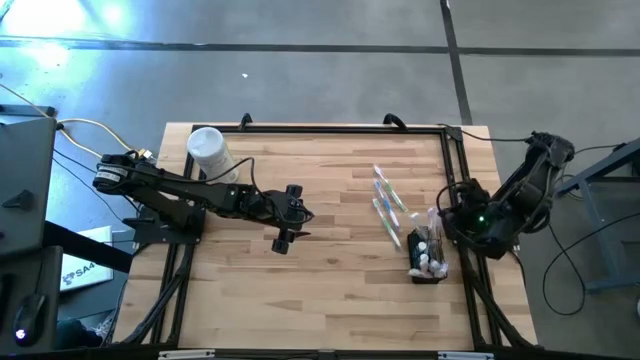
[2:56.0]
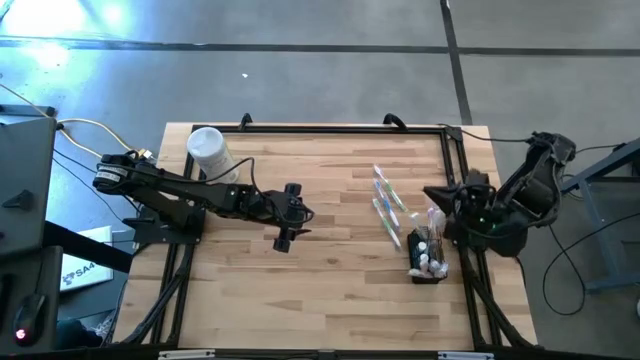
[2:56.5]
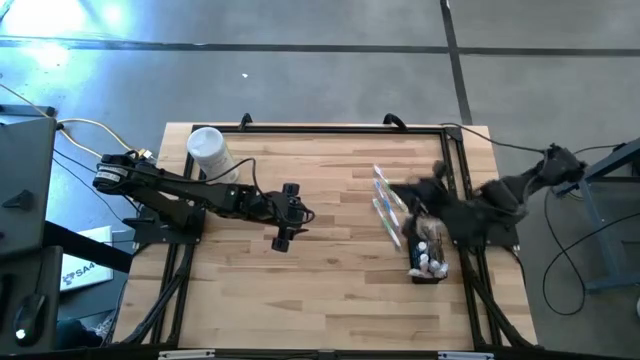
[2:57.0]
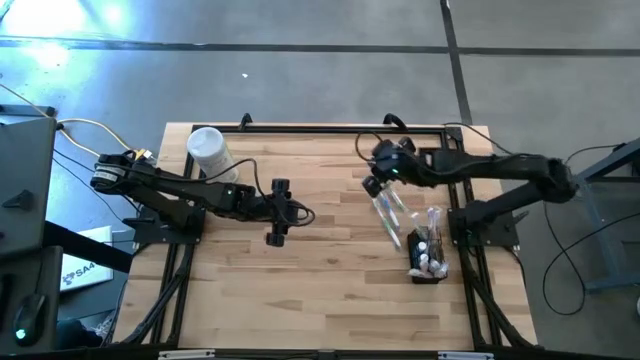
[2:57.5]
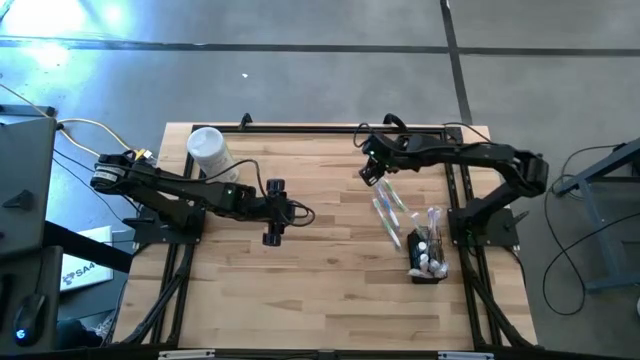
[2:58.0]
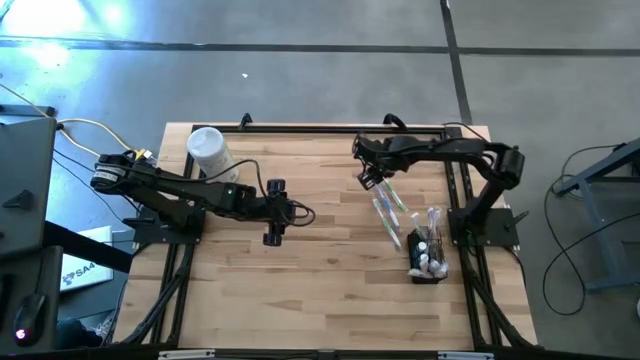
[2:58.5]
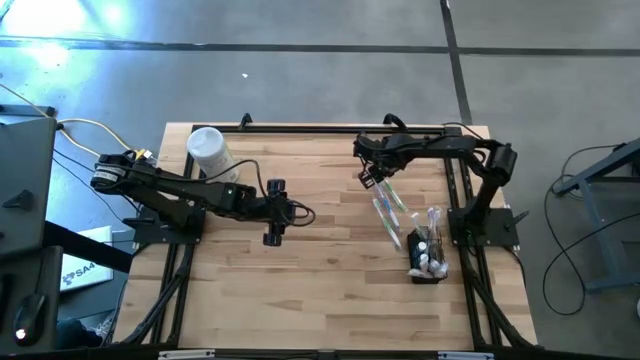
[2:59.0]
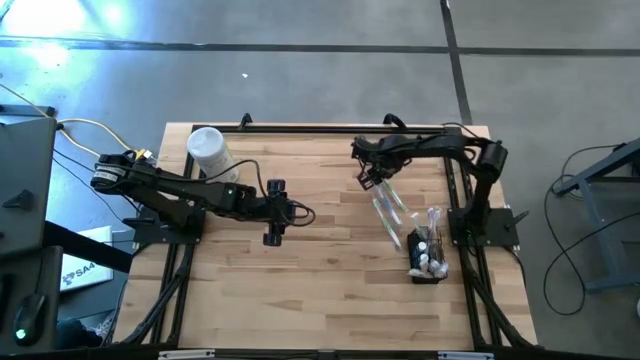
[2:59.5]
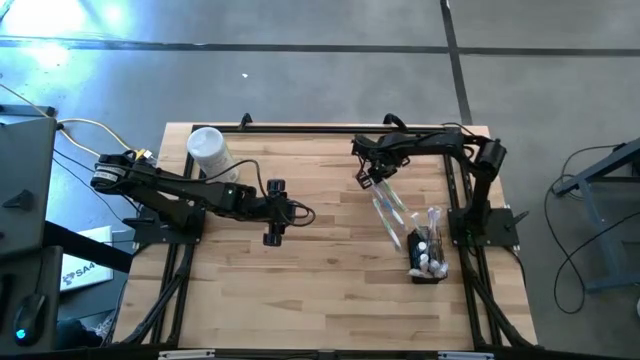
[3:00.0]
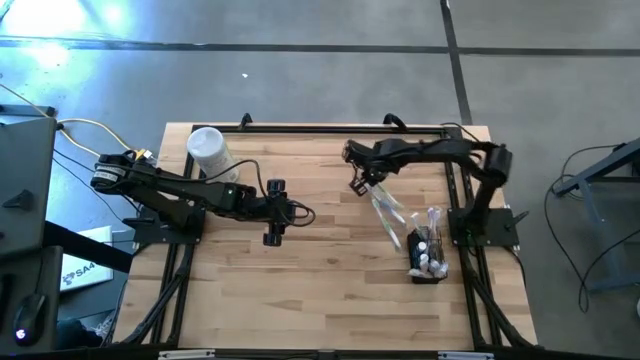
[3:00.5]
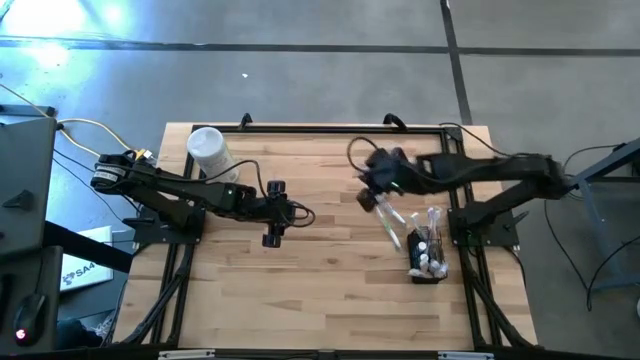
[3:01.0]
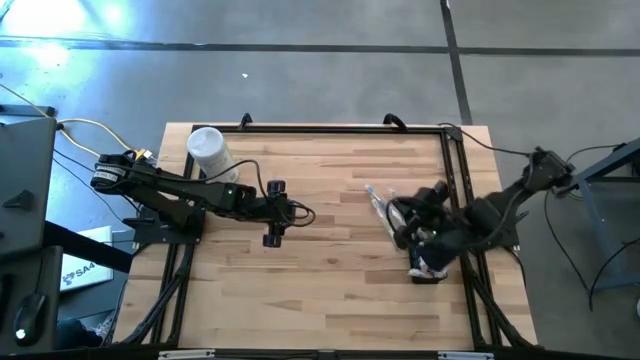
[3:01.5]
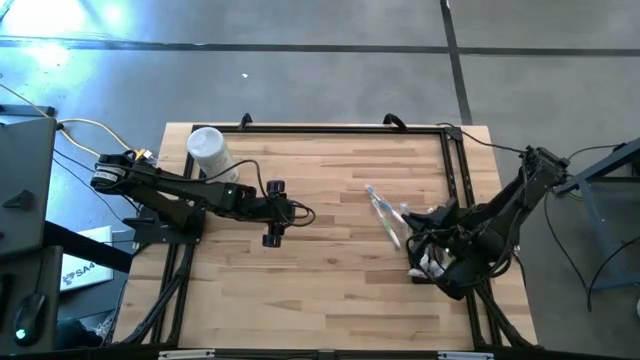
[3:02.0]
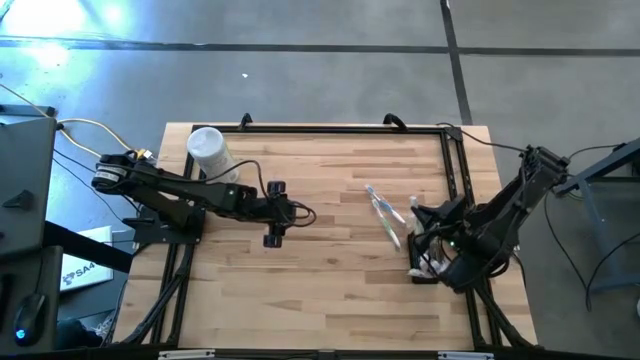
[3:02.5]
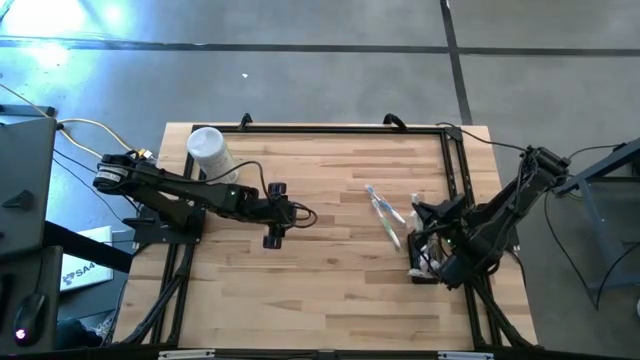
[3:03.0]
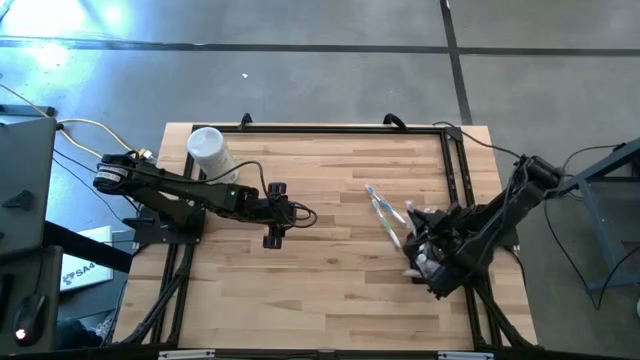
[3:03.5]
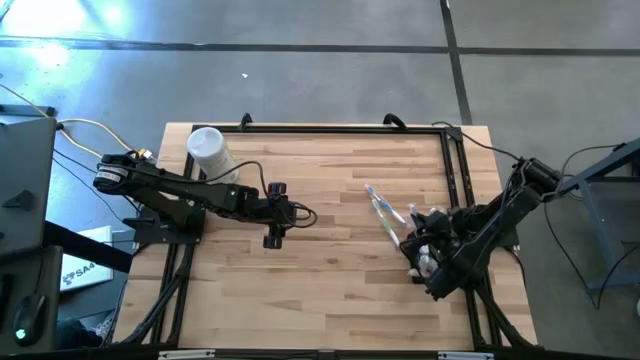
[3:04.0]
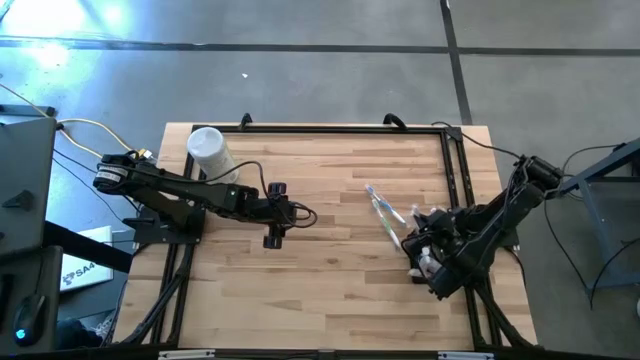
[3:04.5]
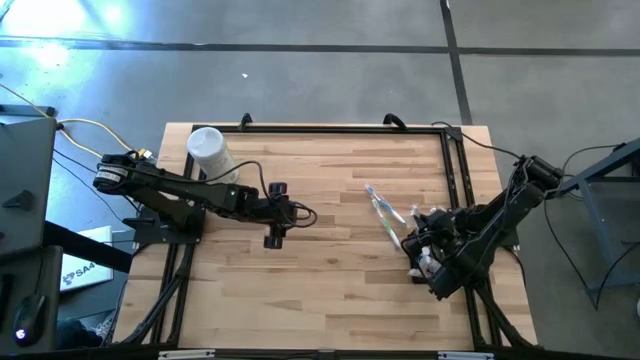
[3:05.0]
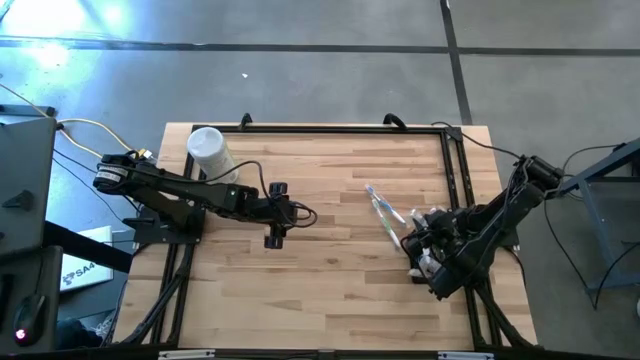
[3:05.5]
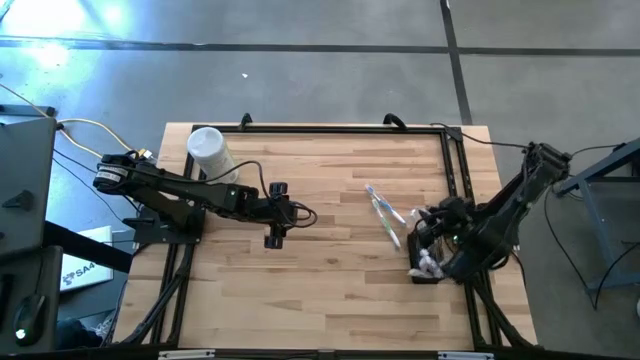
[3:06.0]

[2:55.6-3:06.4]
Task: Pick & Place toothbrushing station
Put the top green toothbrush into the black mesh organizer

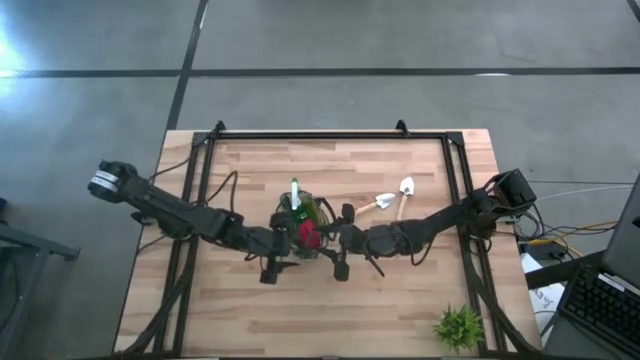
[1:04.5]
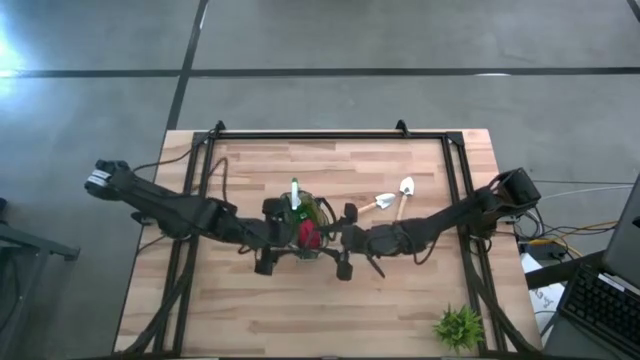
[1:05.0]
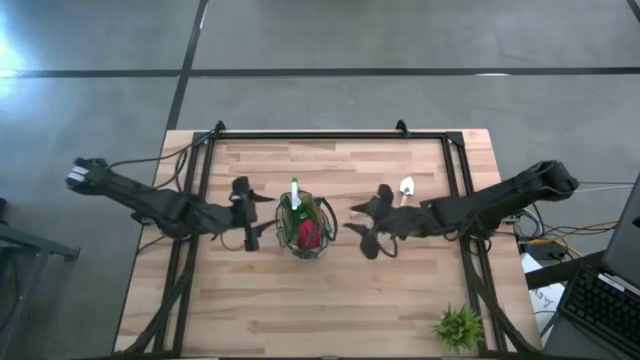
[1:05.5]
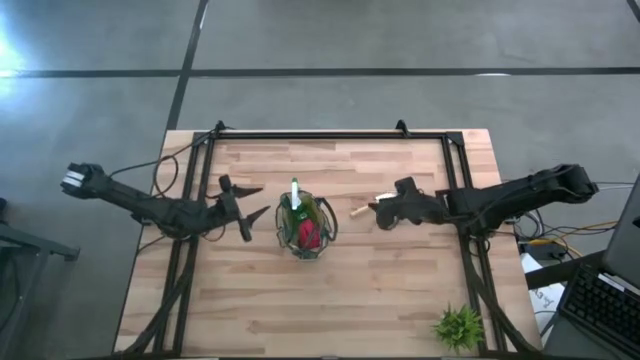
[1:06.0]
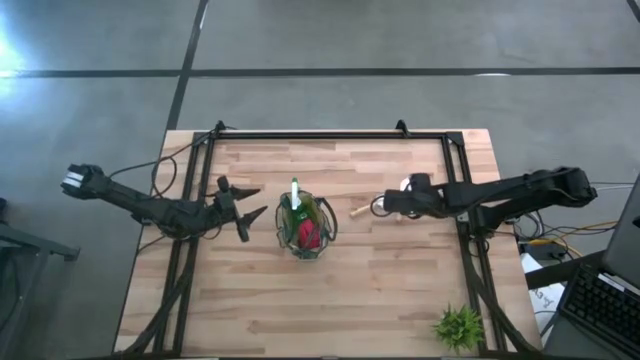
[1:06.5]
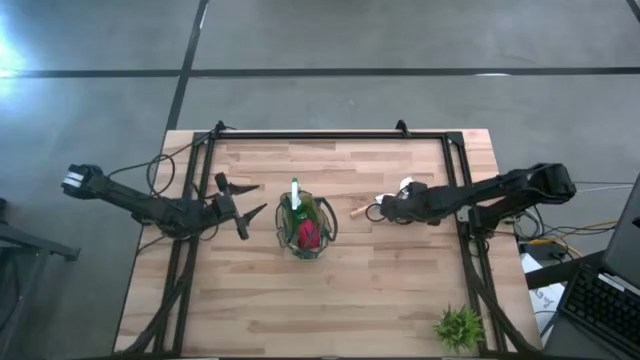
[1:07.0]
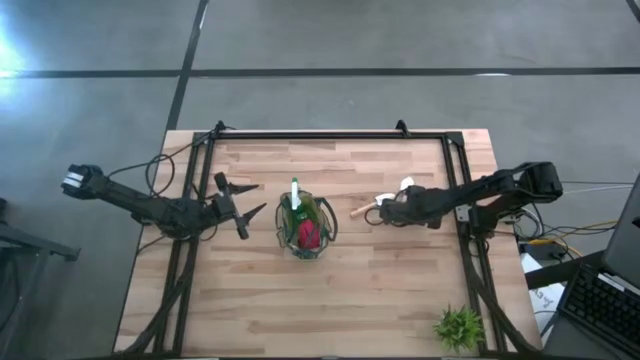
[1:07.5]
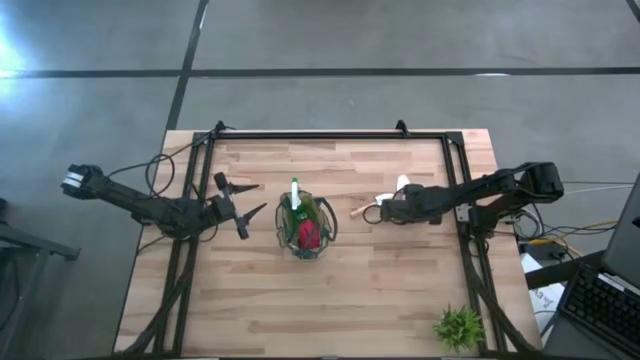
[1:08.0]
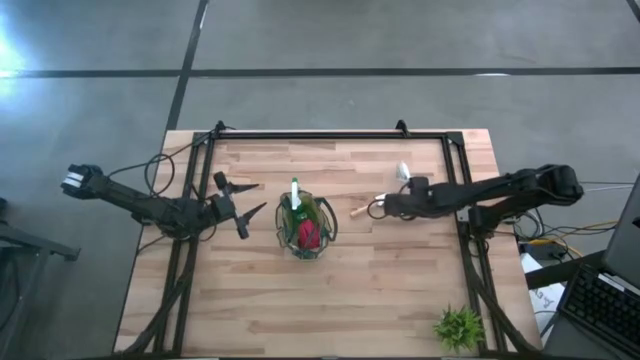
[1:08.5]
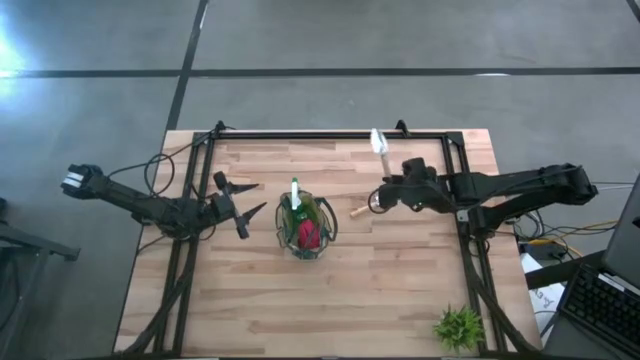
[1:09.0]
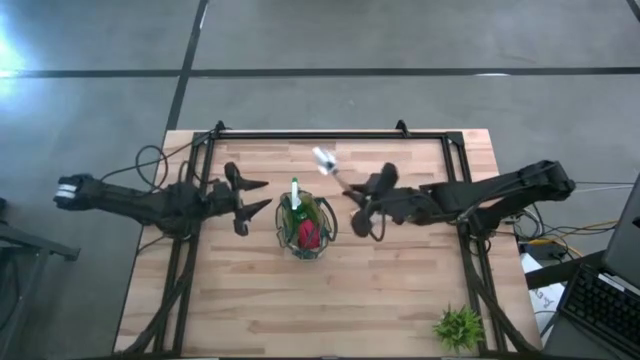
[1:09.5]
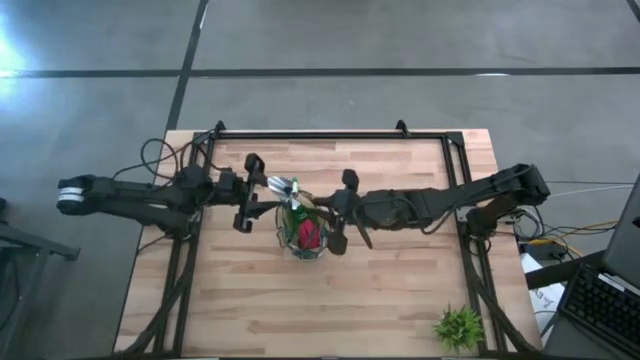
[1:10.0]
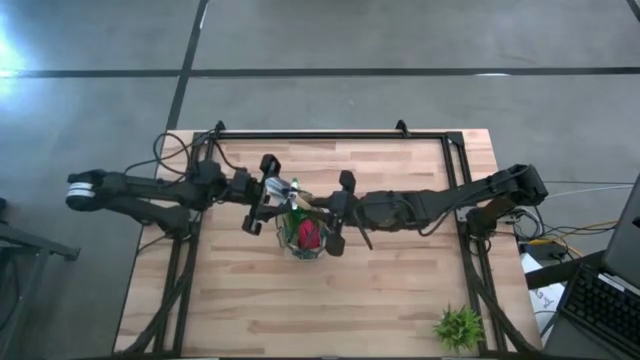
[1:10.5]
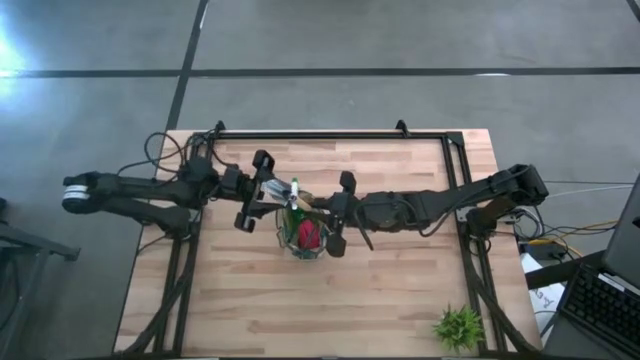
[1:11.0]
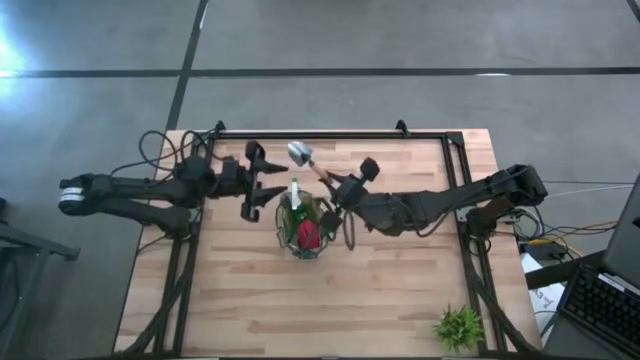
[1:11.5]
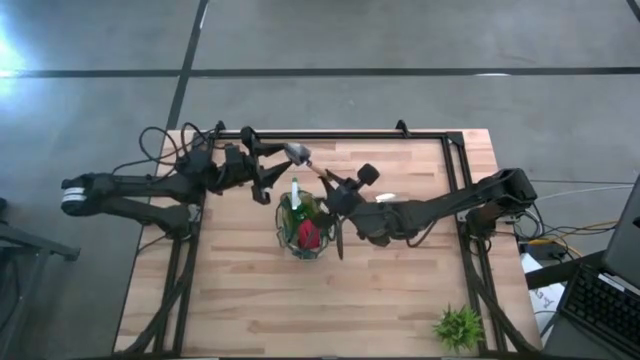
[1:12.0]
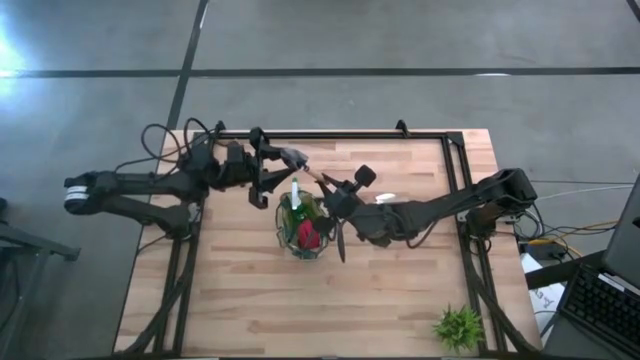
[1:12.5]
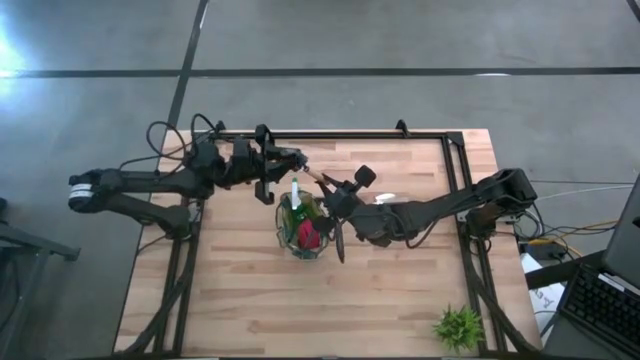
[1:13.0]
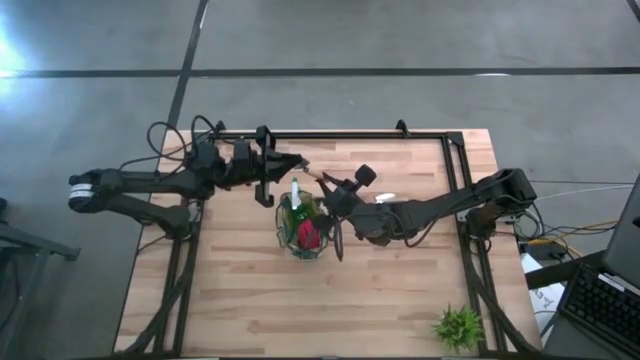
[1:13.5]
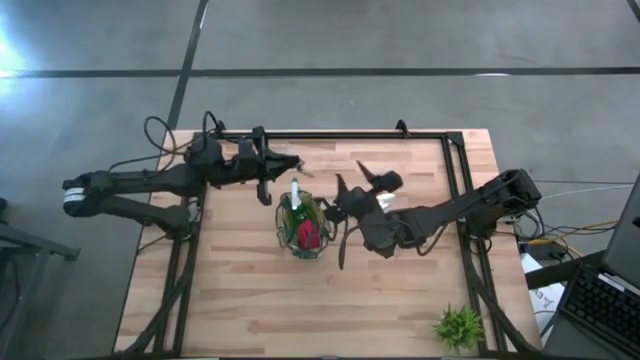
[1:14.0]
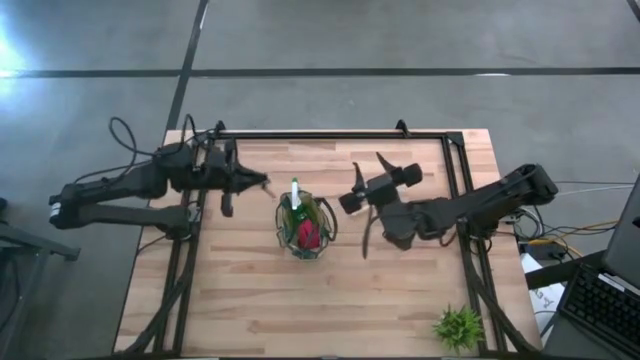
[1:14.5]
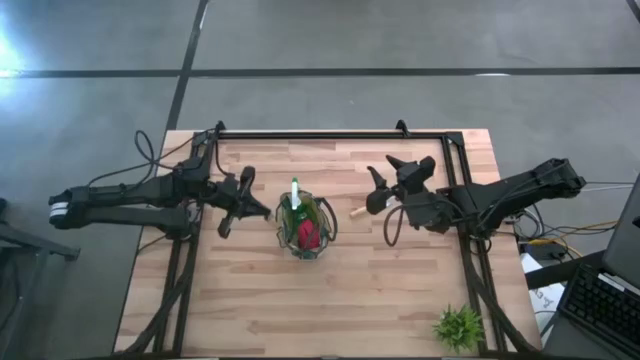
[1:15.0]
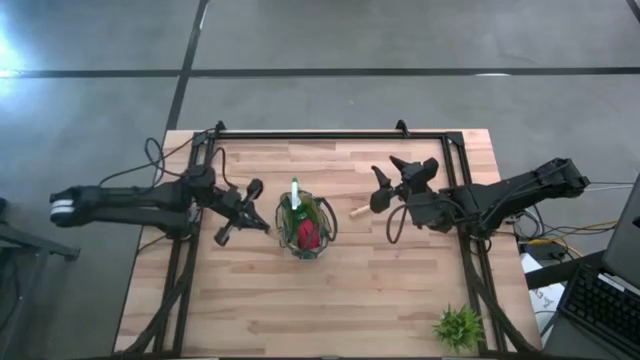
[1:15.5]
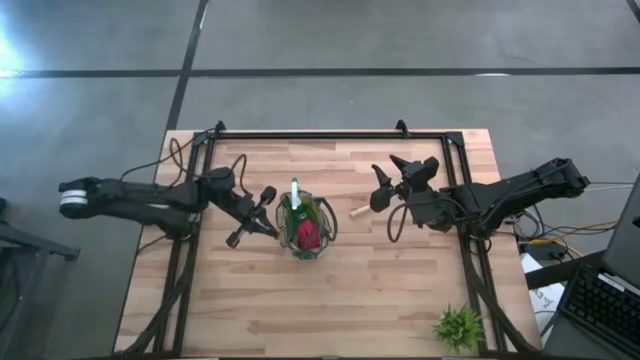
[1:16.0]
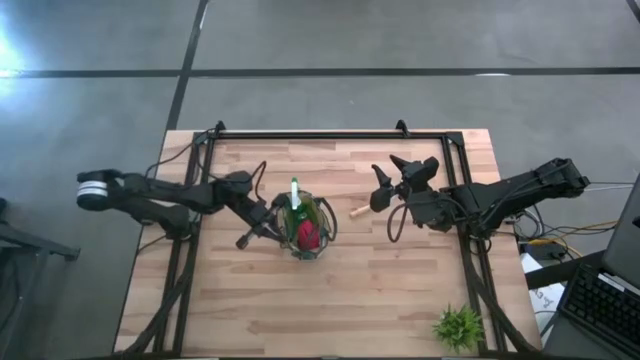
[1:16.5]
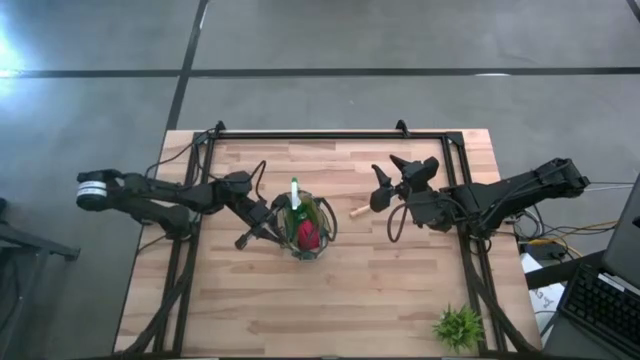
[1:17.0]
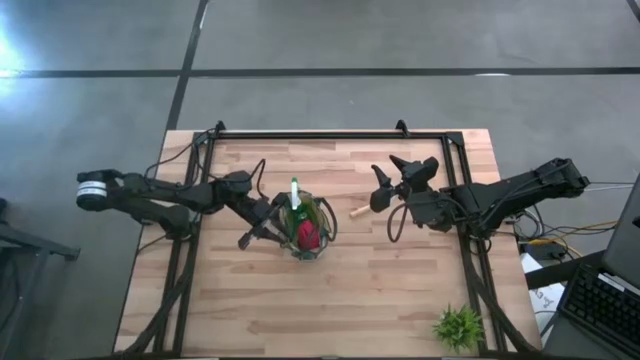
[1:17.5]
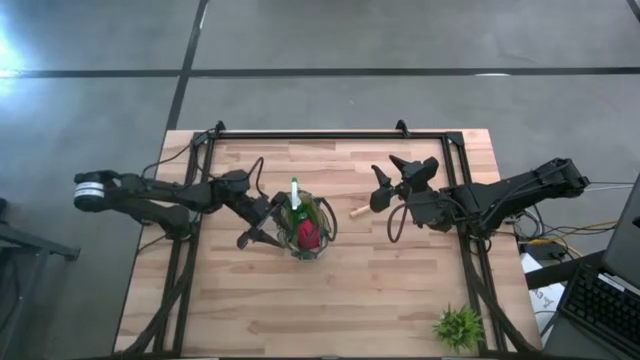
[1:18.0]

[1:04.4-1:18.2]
Task: Pick & Place Garden tools in Gardening bag
Put the right brown trowel into the gardening bag
